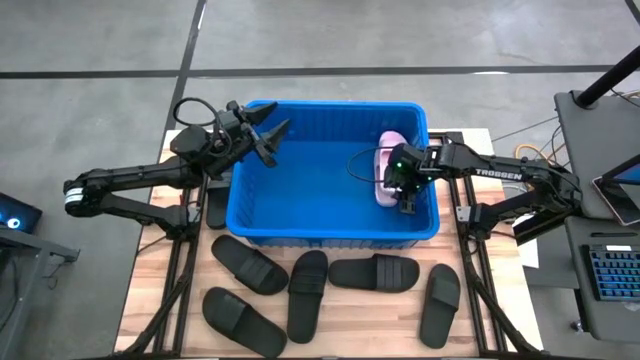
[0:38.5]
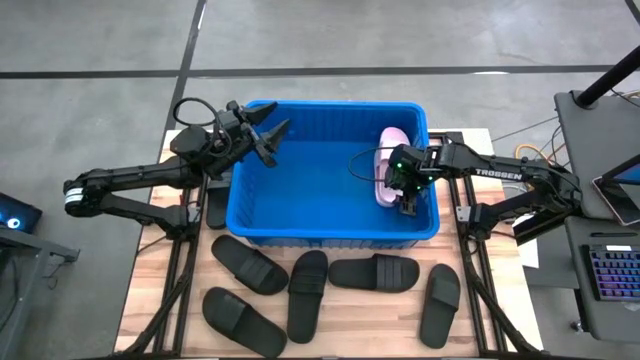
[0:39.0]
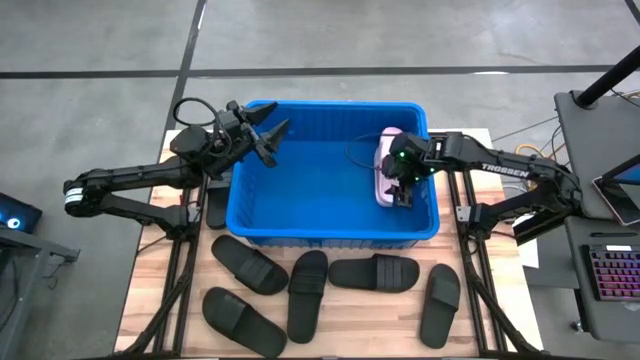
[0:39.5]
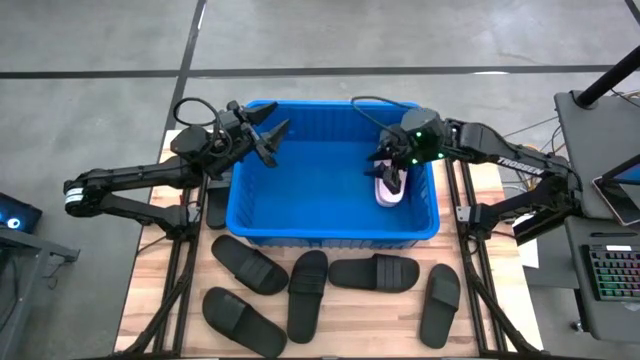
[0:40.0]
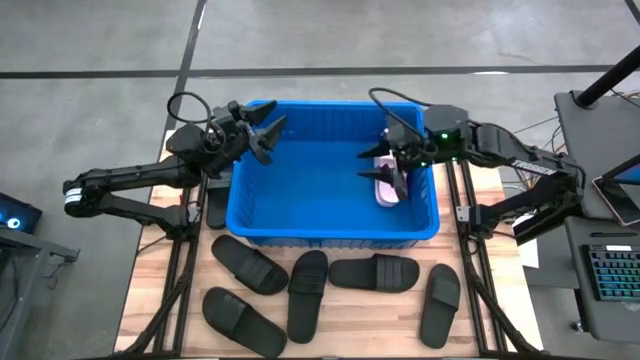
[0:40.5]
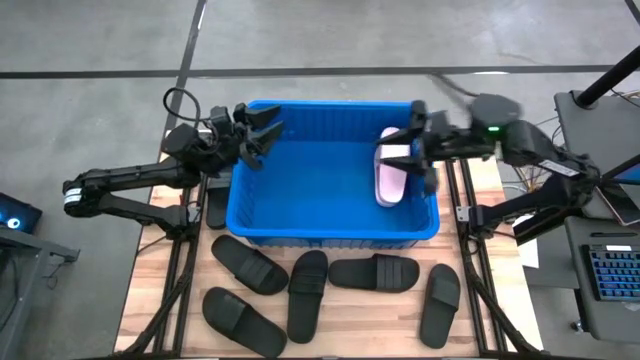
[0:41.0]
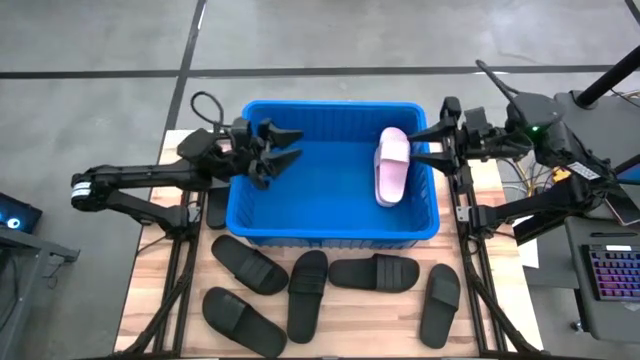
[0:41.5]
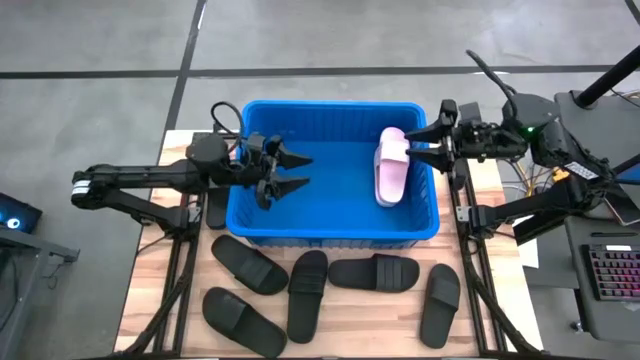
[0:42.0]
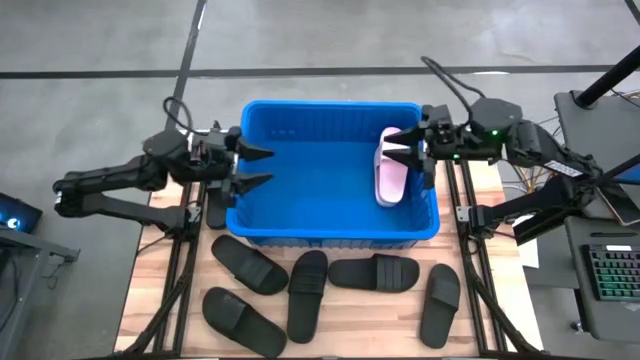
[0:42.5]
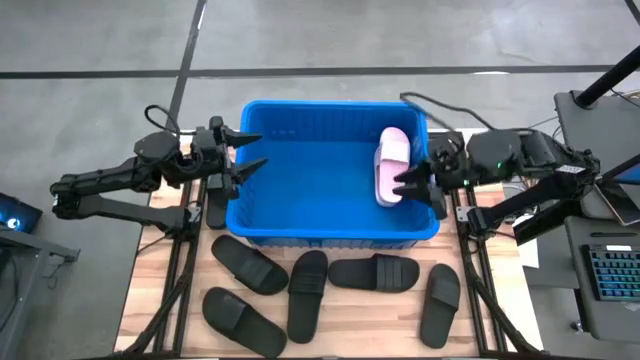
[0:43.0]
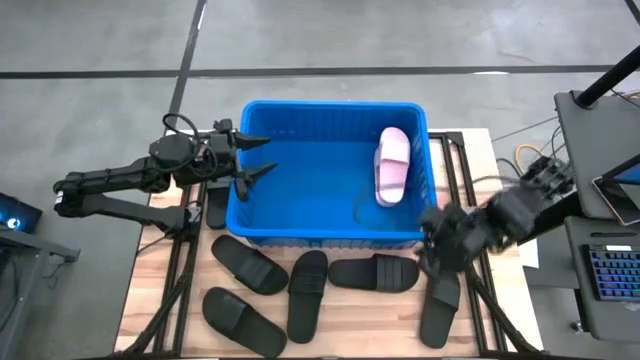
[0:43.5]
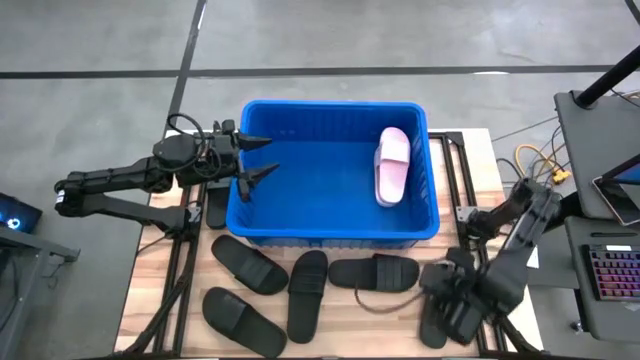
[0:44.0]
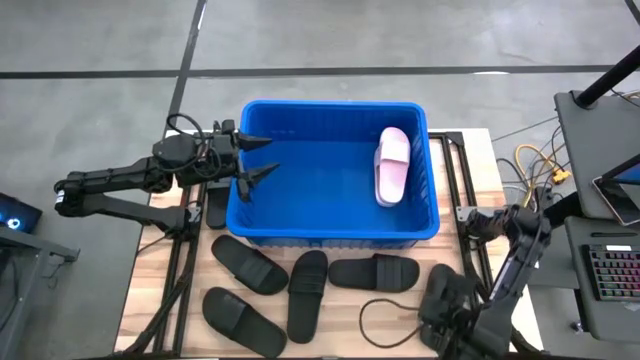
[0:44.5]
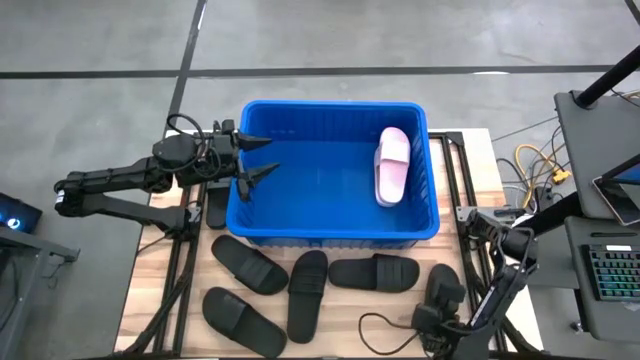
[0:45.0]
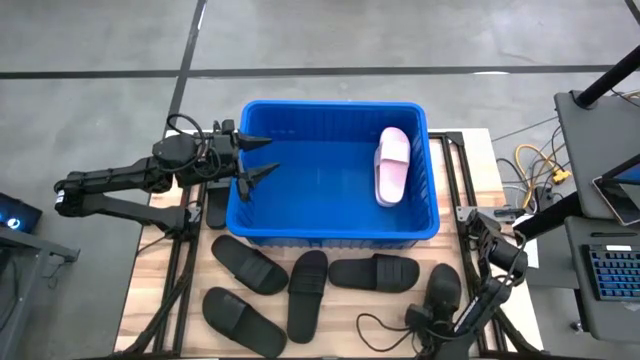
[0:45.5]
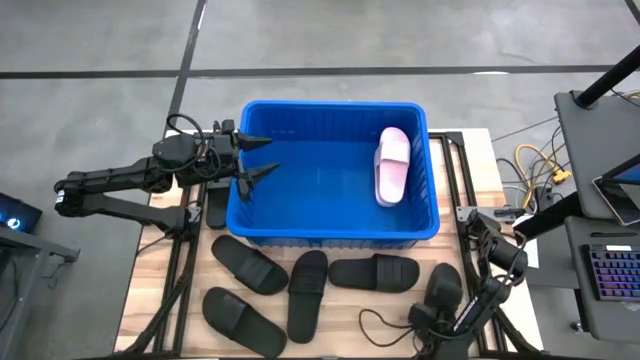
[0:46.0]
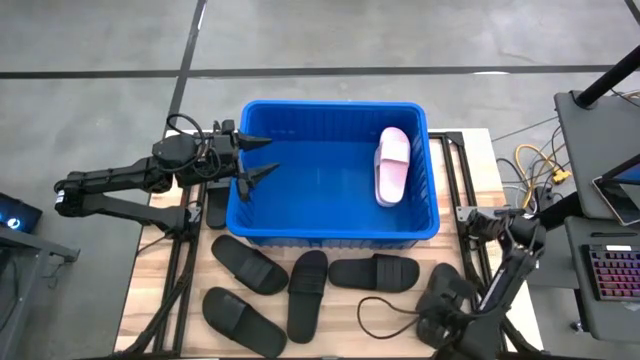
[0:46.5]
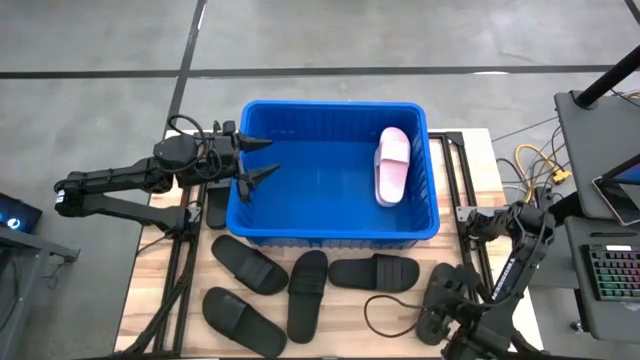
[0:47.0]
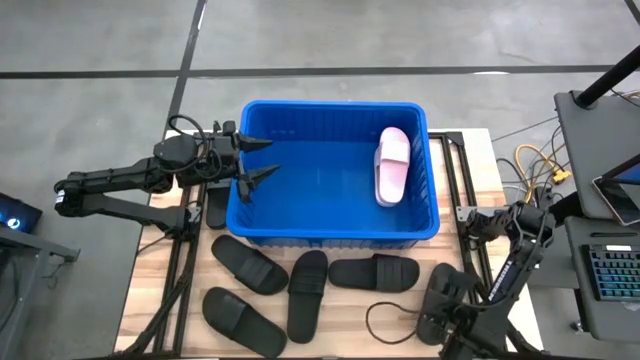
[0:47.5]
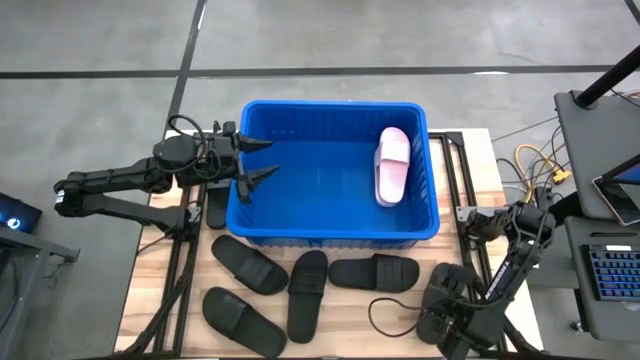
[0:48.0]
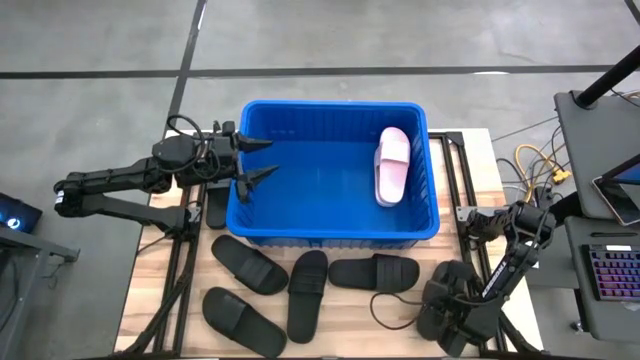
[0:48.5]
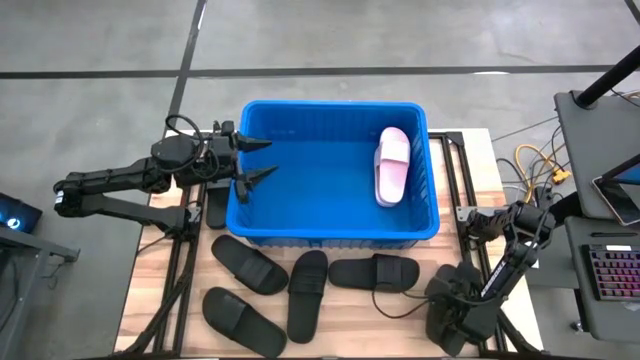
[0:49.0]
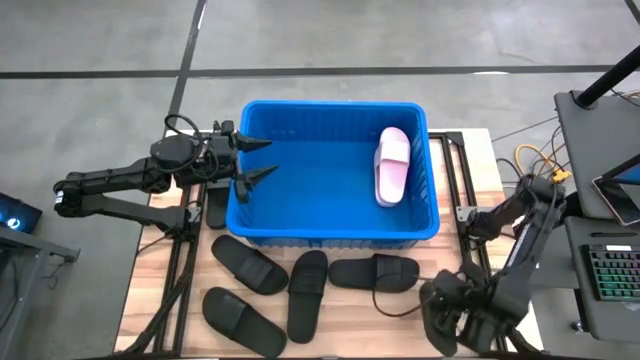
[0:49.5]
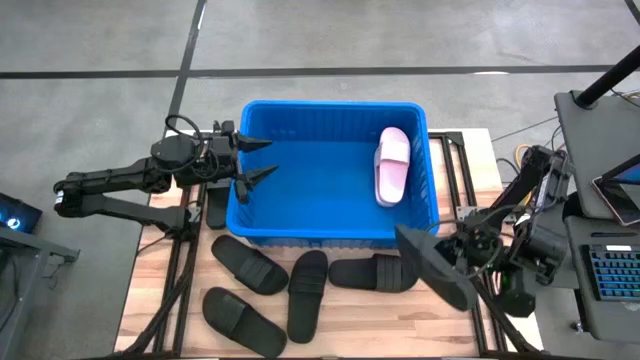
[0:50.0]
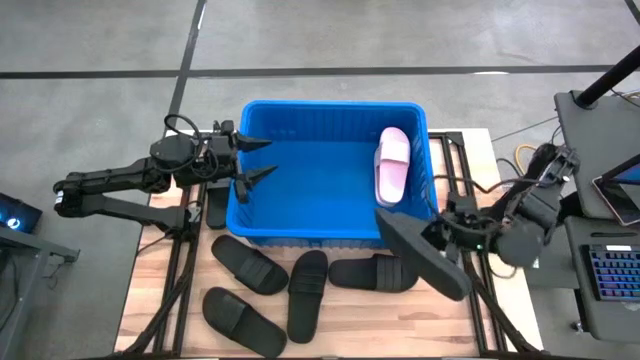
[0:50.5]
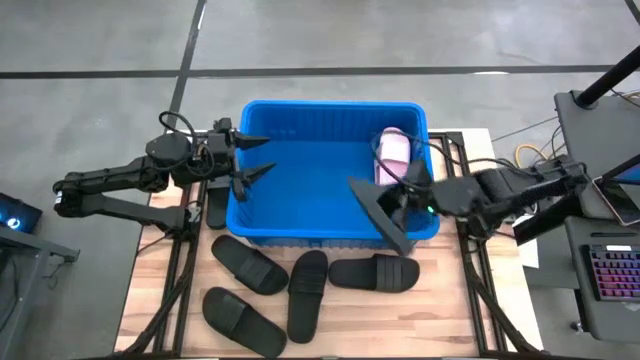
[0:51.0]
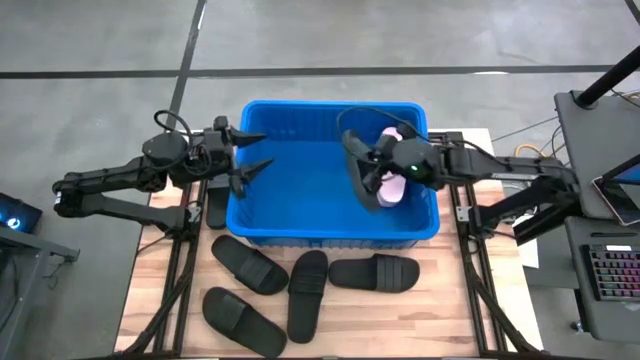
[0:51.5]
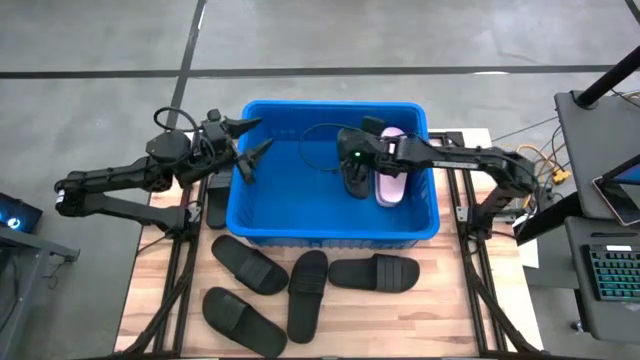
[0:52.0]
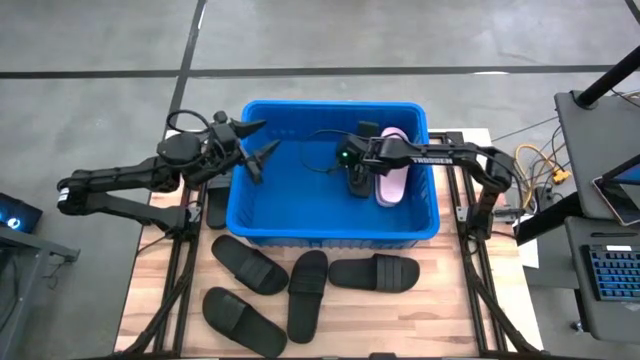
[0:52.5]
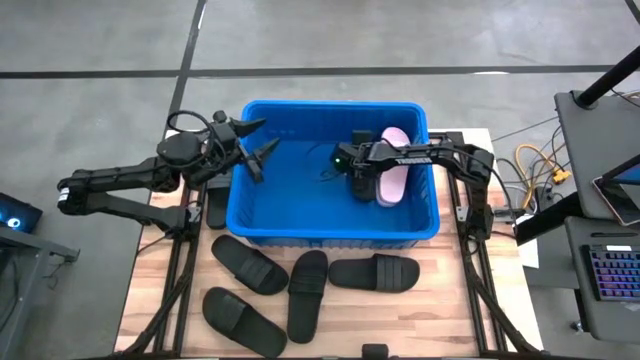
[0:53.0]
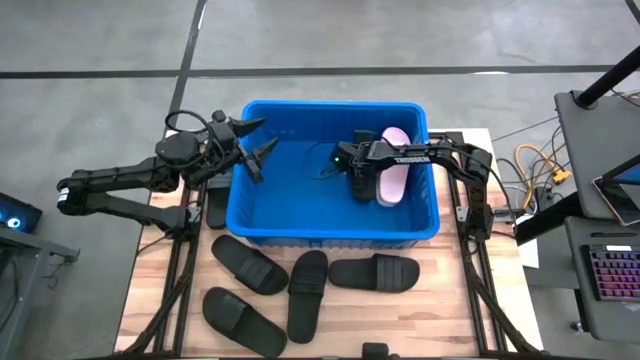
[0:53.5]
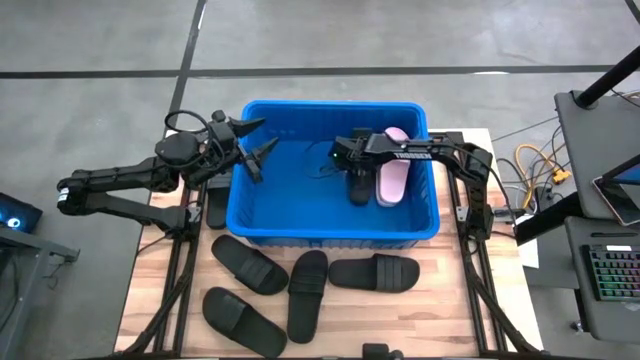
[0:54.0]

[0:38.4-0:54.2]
Task: Pick and place slides into bin
Put the black slide into the blue bin

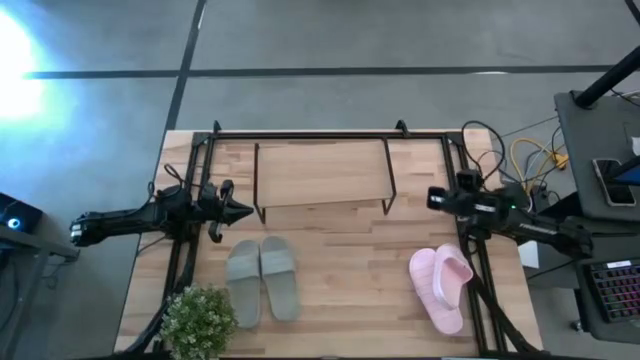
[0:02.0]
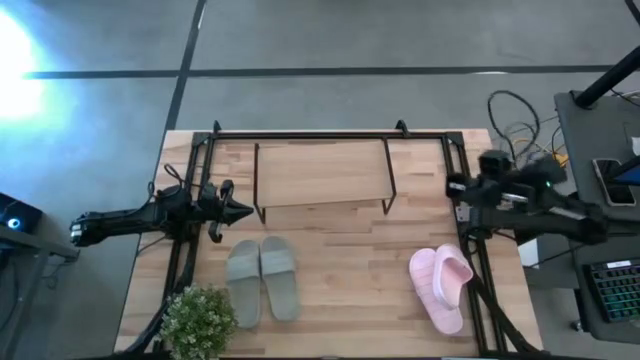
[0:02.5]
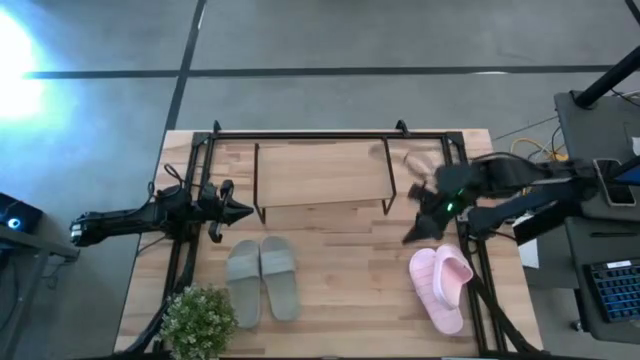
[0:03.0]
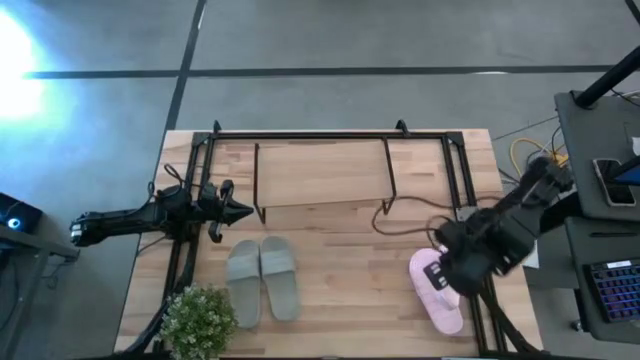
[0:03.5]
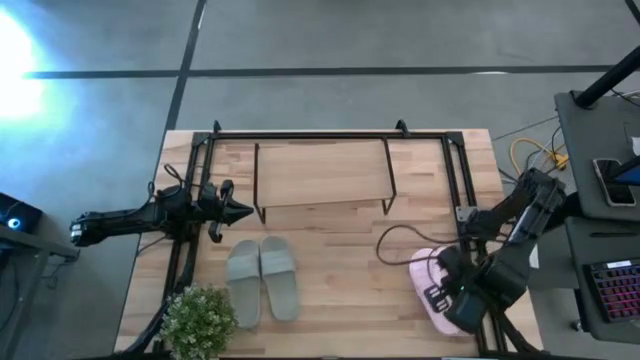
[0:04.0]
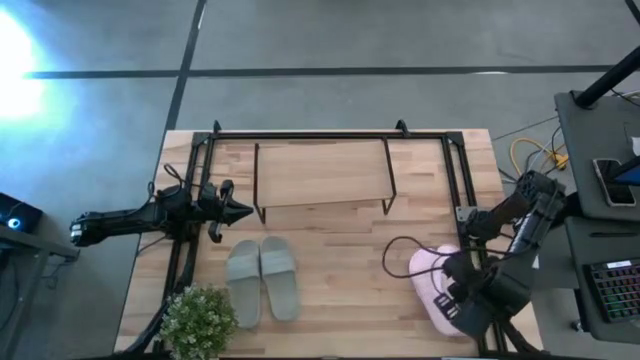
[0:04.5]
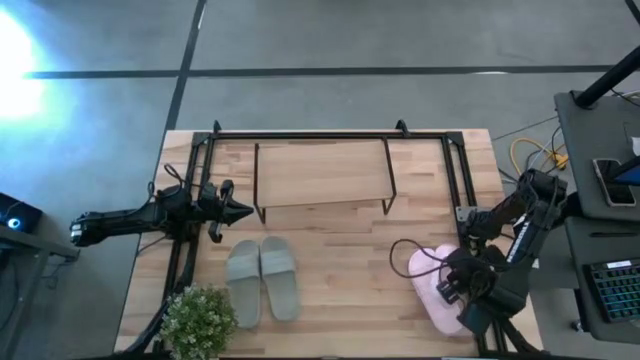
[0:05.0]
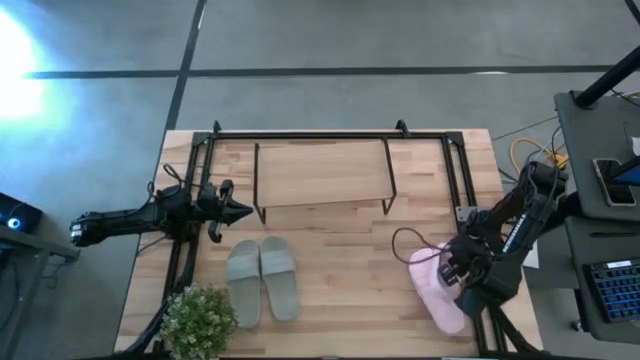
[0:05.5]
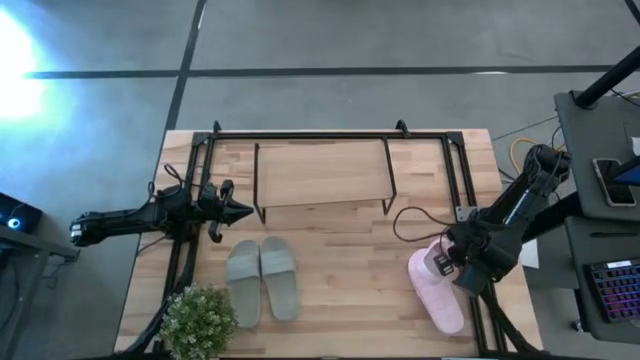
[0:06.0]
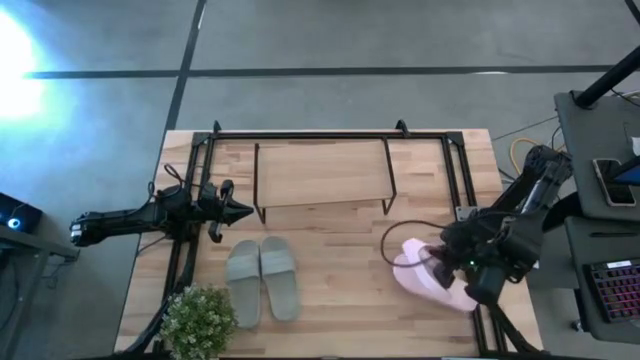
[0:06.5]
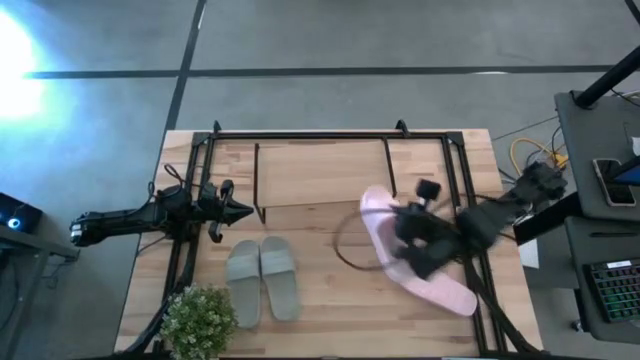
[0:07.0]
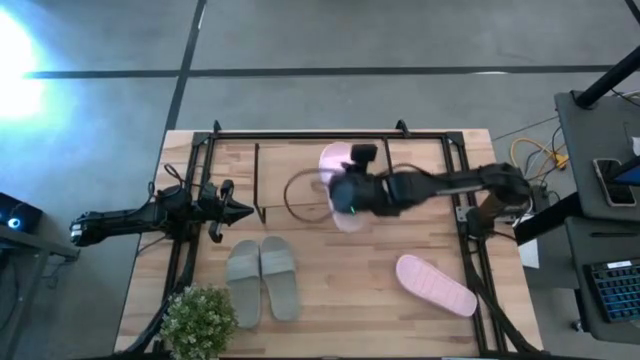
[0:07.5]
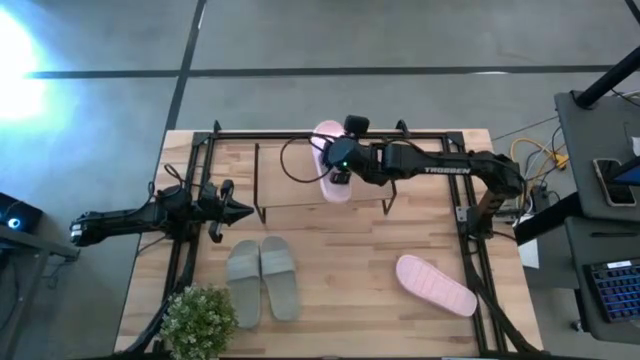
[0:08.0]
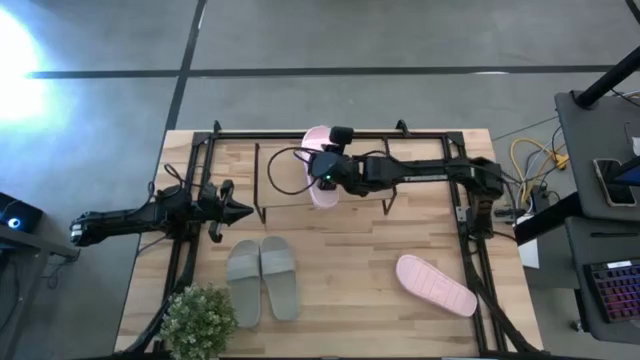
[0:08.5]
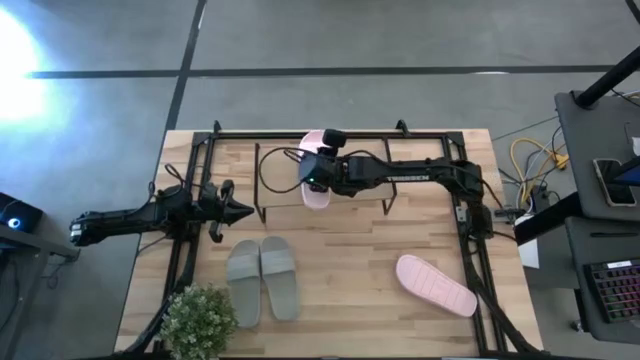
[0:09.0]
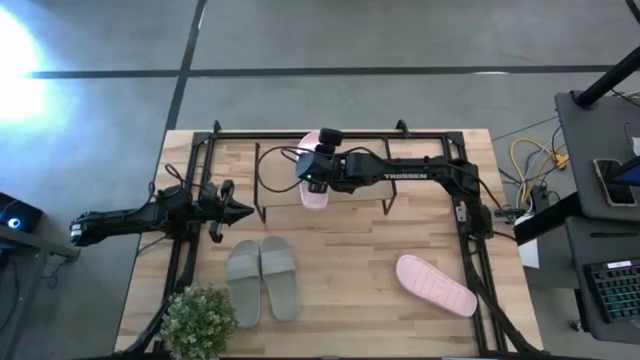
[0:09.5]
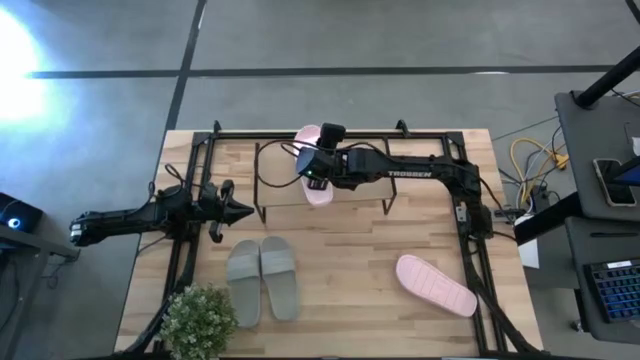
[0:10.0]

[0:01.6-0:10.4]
Task: Pick and place slides into the shelf
Put the right pink slide on the shelf
